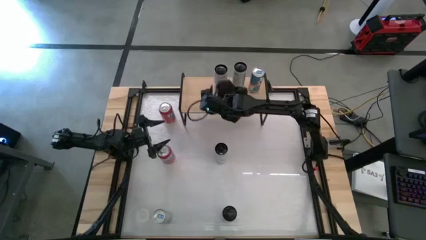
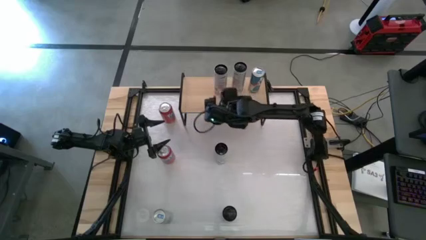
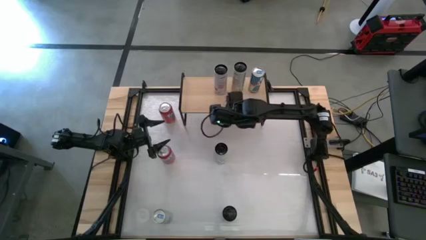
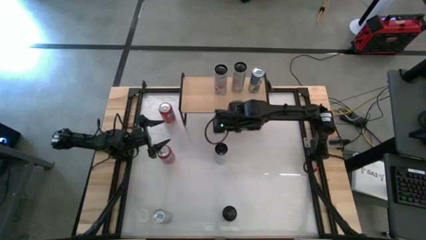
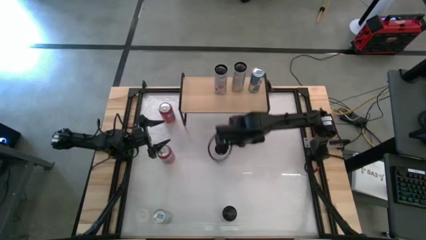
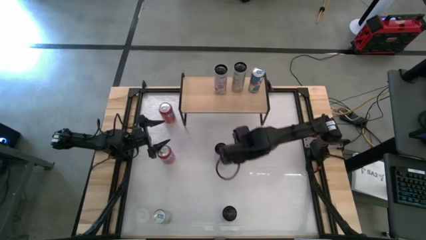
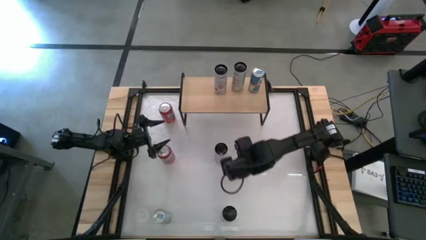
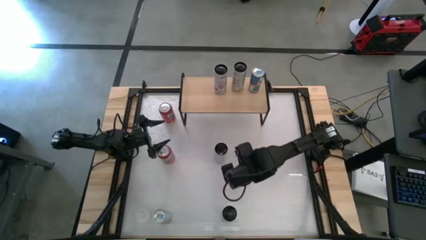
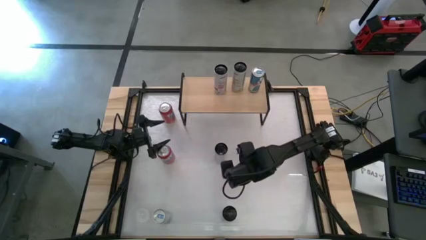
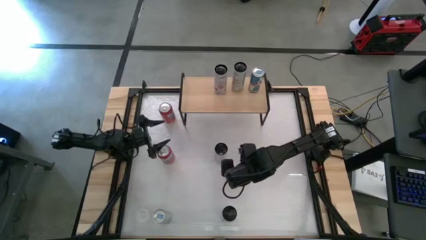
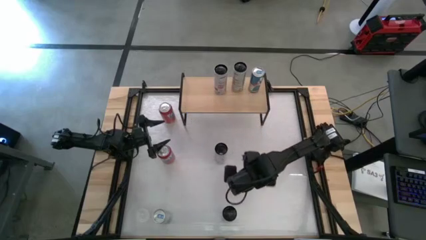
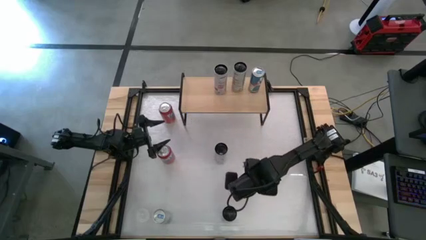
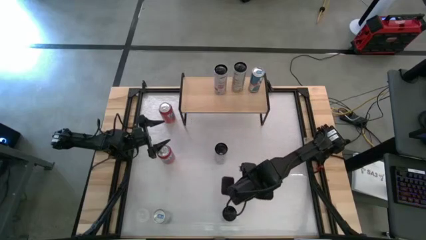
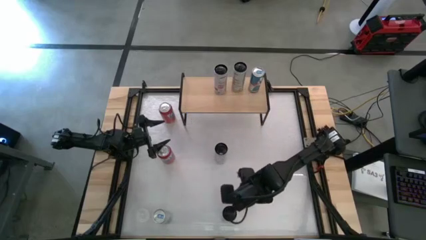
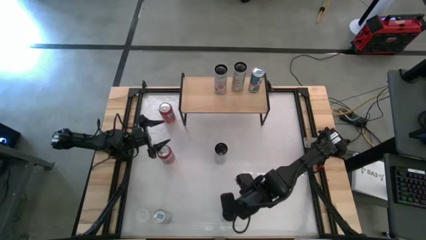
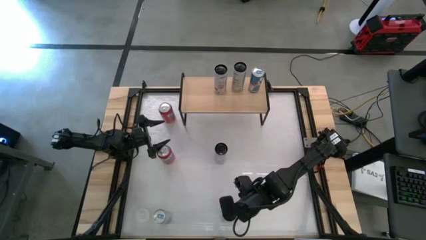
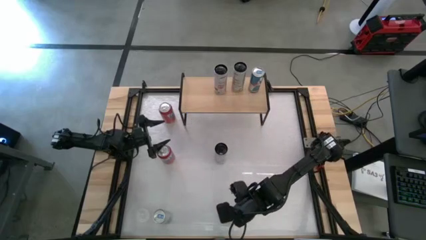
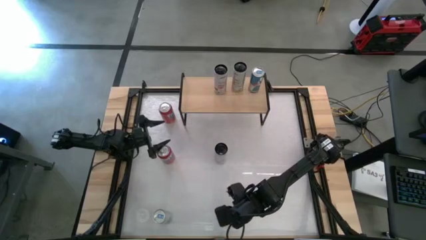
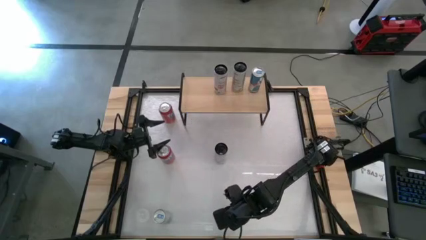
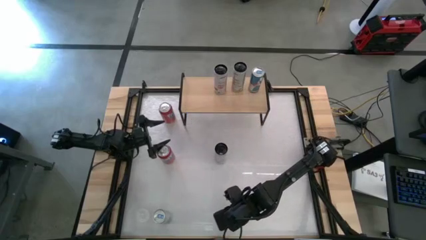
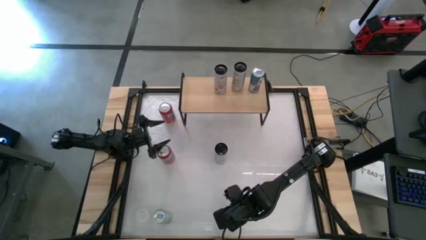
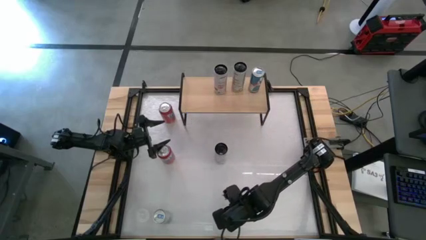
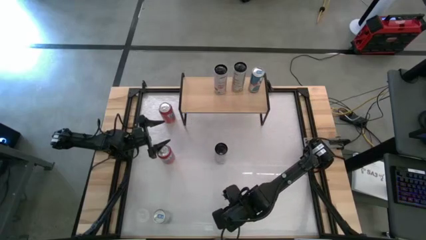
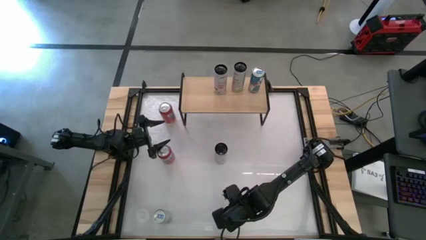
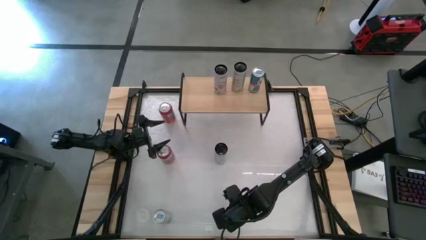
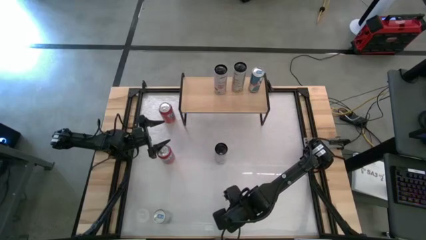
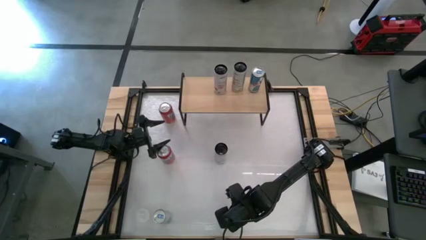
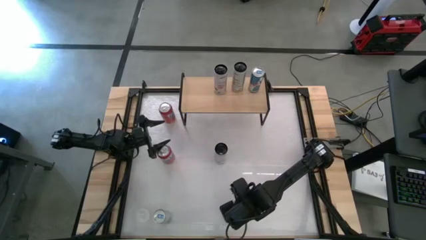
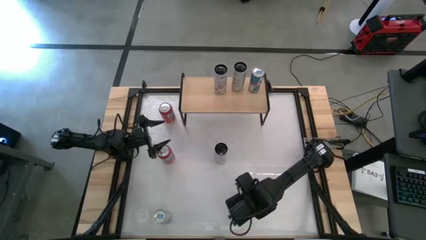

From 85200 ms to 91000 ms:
Task: Place canned beverage on shelf
Move the white yellow soda can to the center of the table

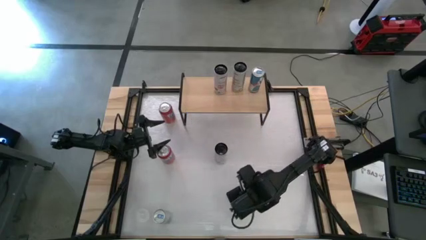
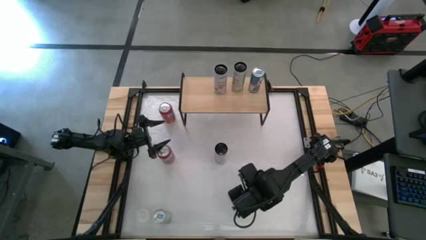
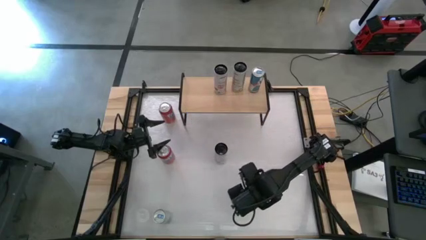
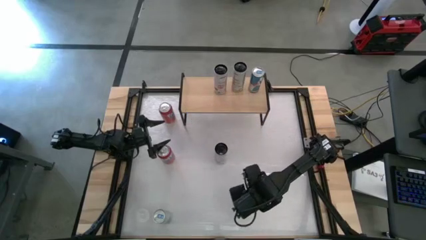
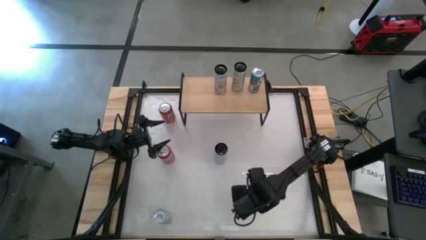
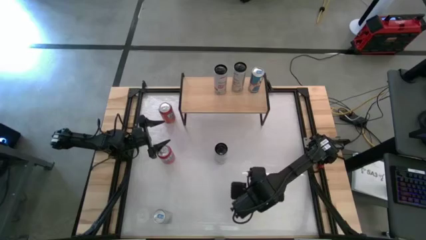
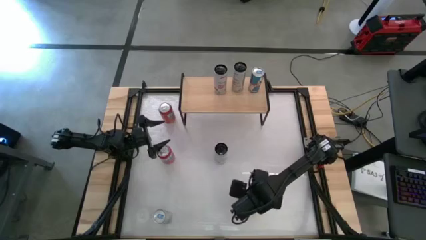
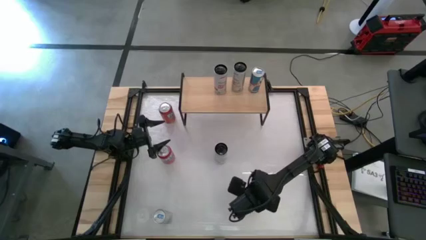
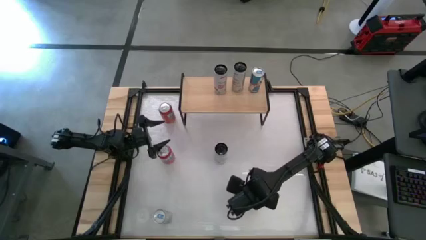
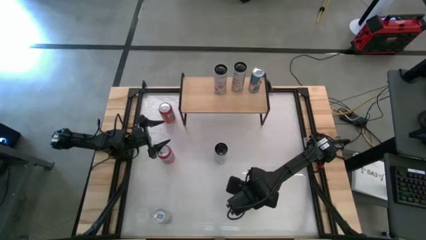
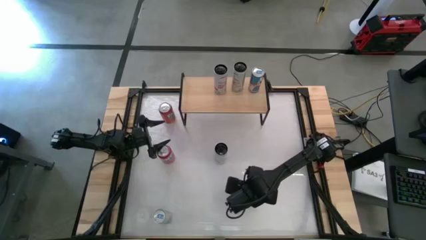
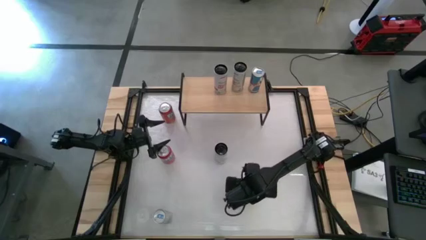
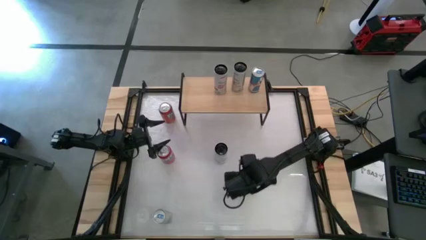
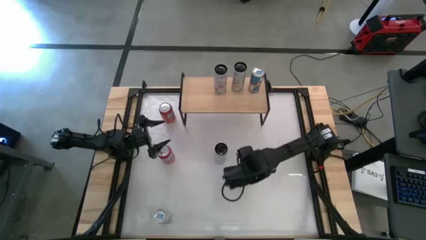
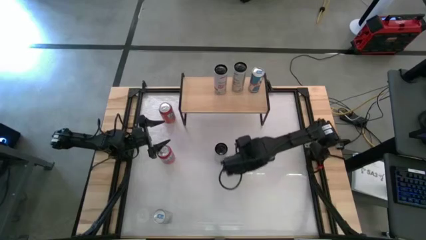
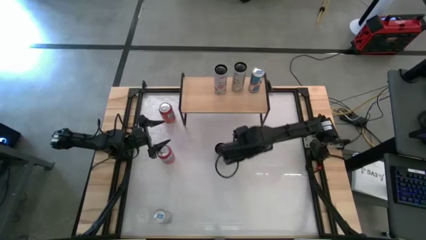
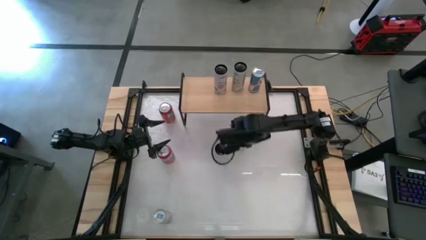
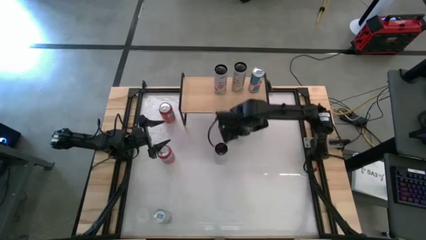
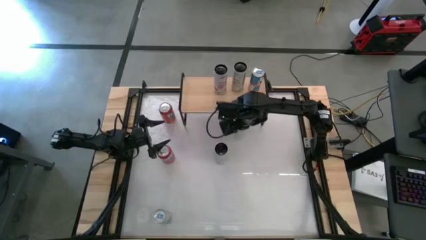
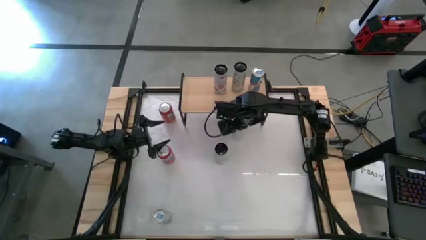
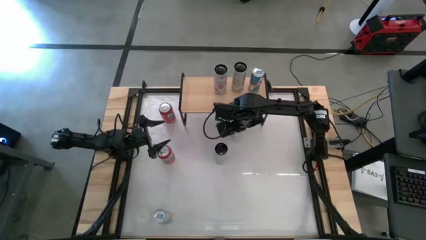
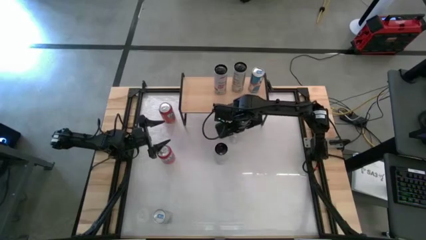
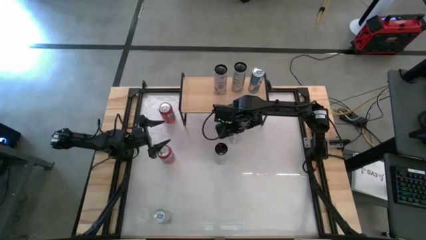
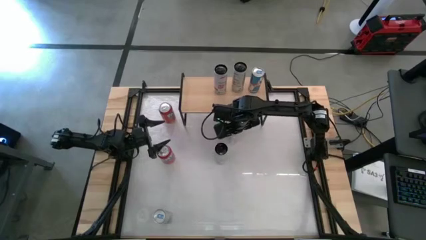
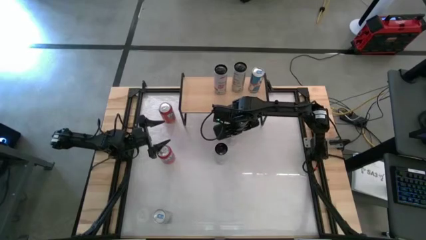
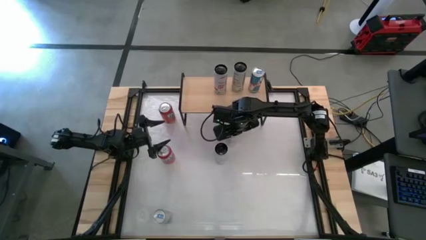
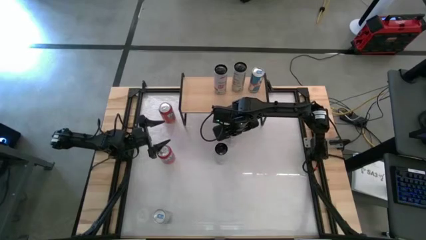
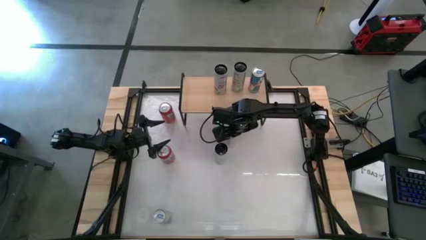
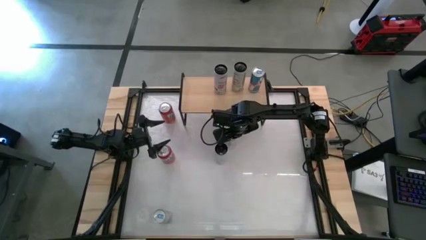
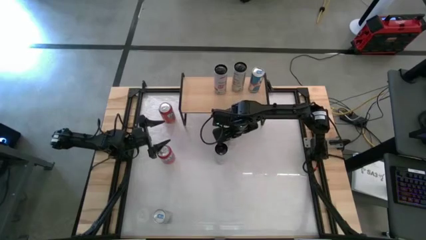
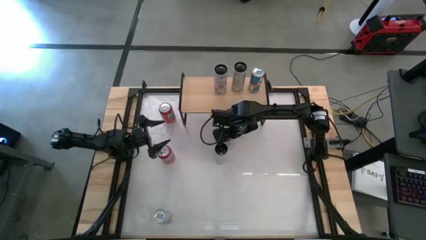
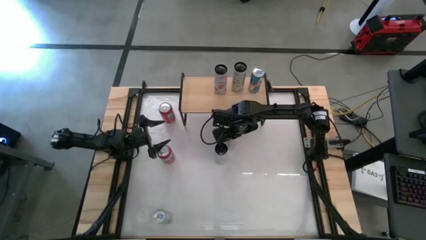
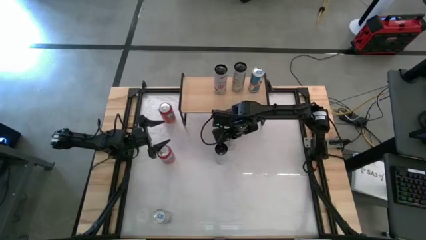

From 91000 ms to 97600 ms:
Move the white yellow soda can to the center of the table

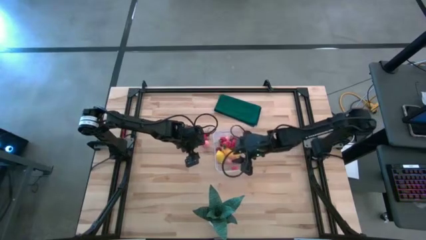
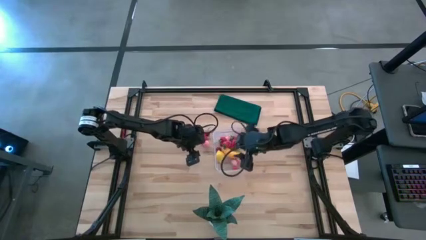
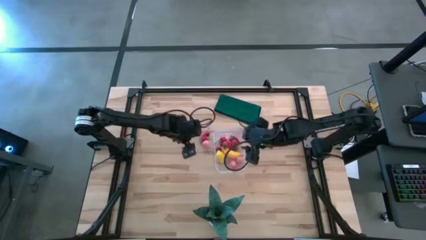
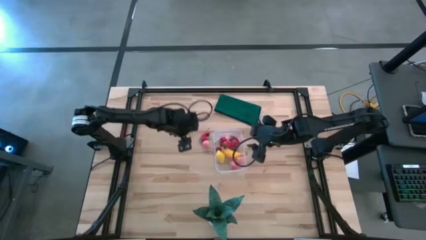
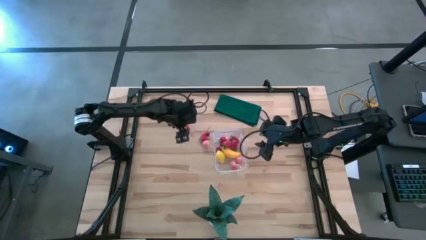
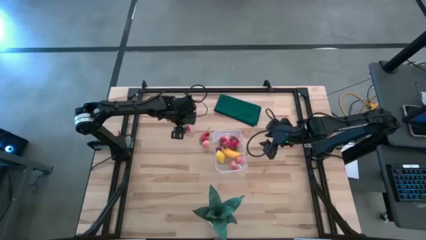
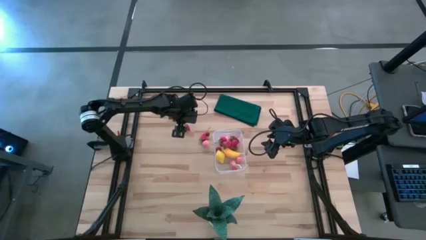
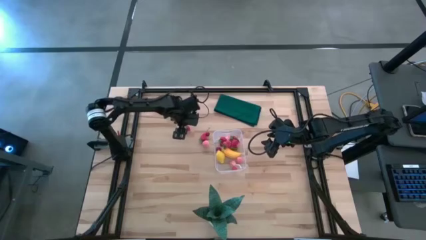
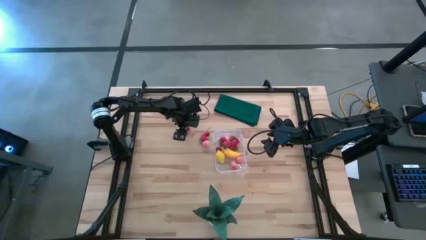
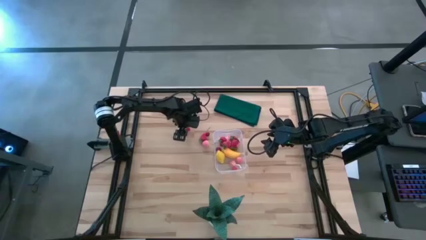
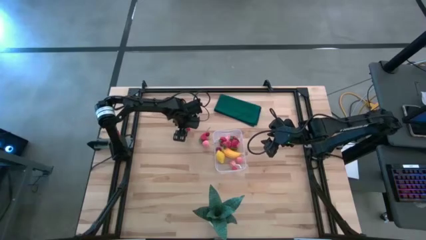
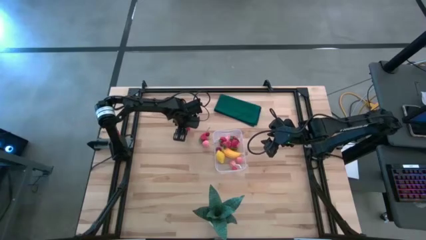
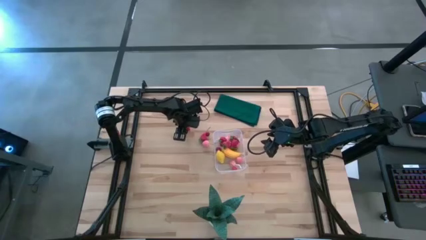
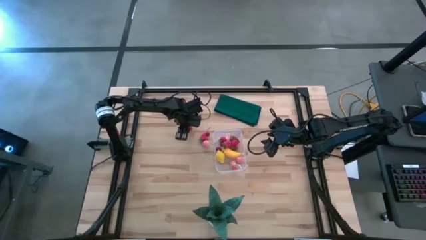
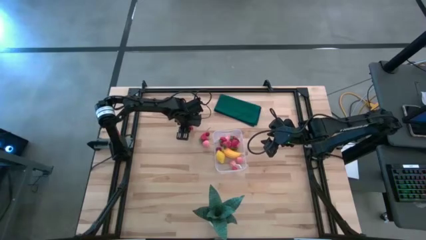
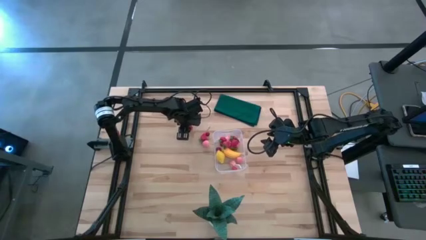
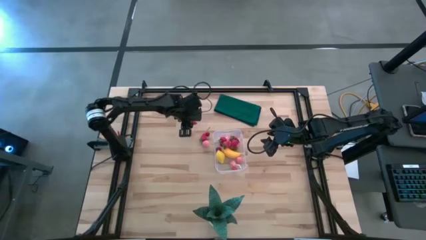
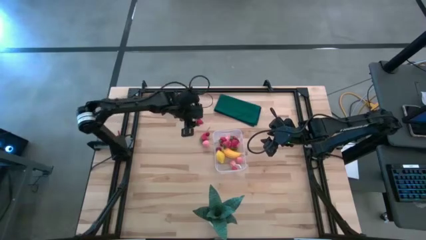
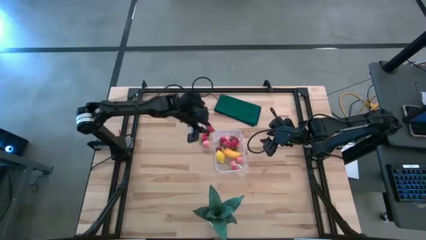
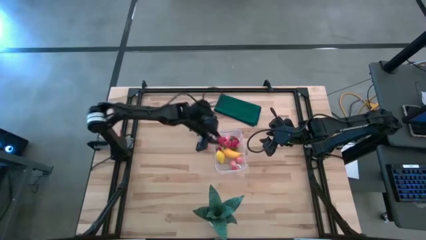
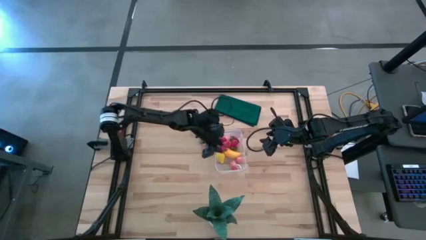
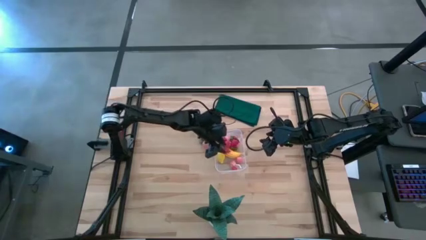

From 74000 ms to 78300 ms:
Task: Pick and placing Produce into tupperware
Put the strawberry into the transparent bin
